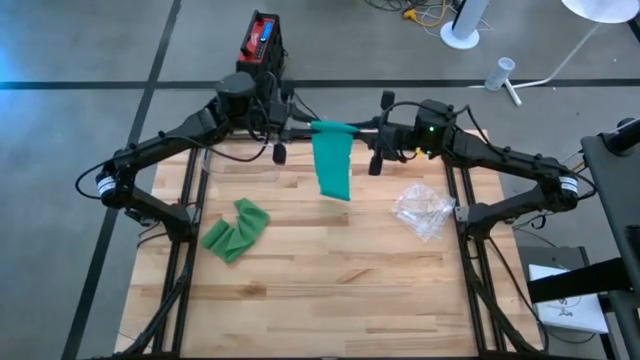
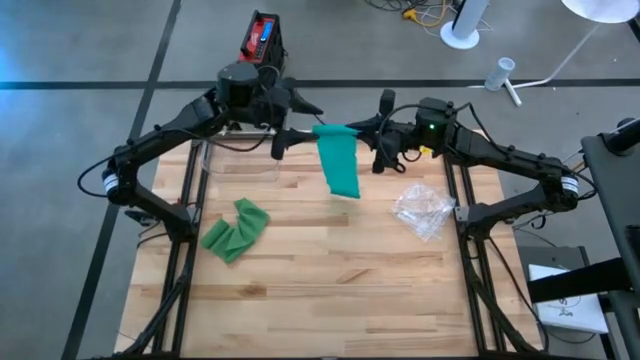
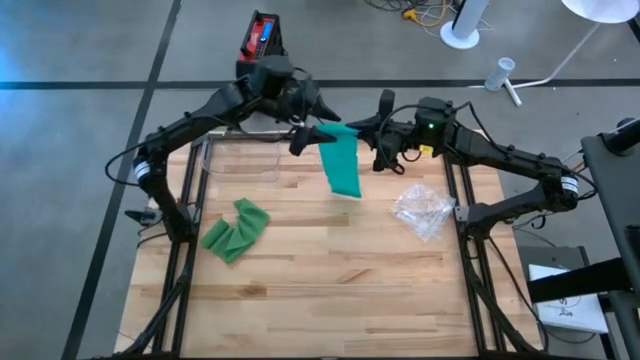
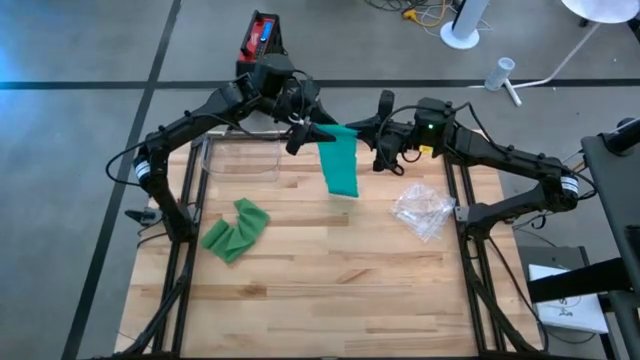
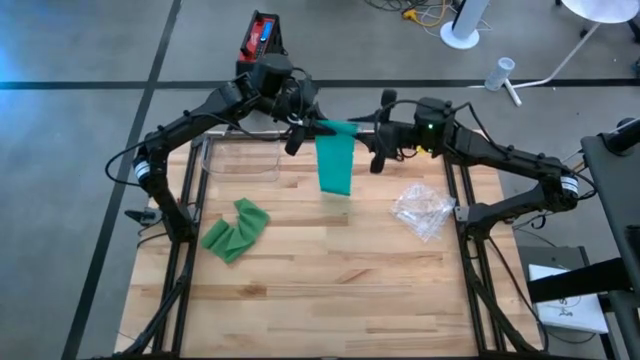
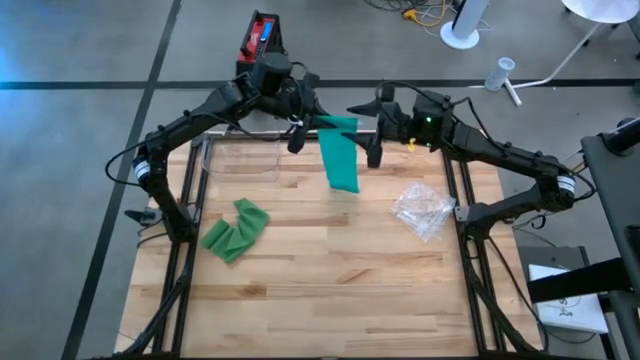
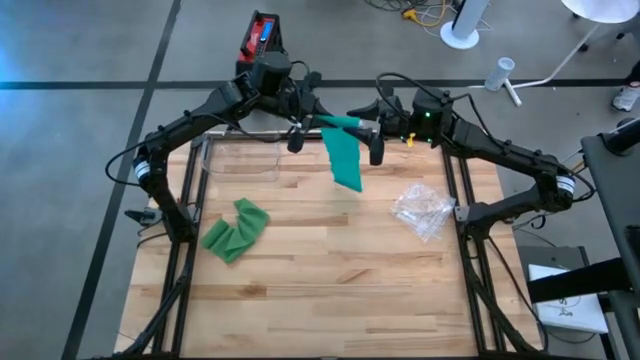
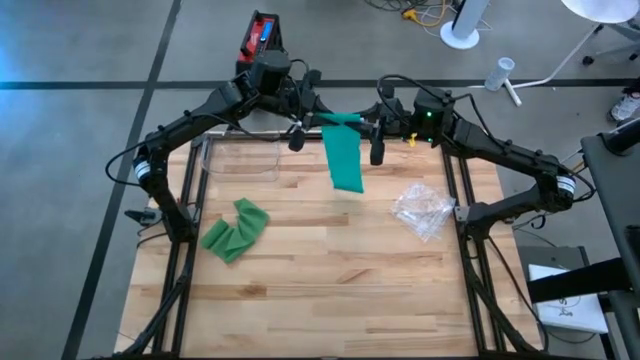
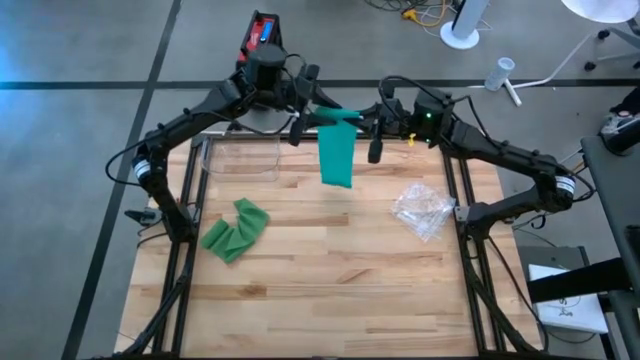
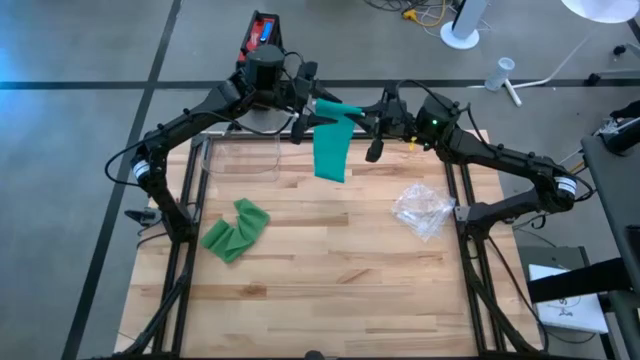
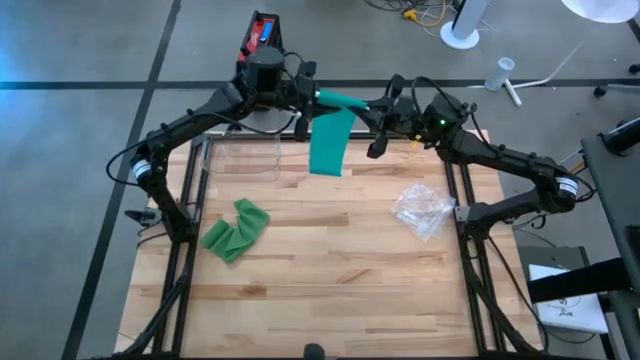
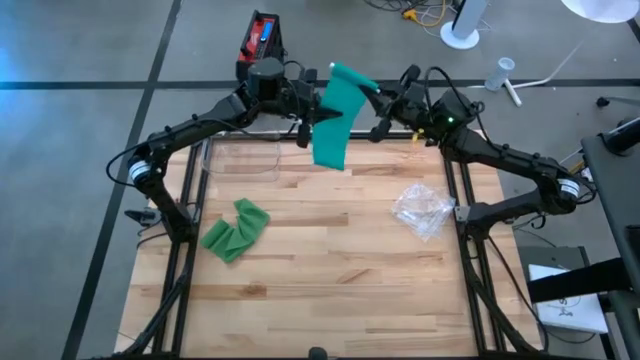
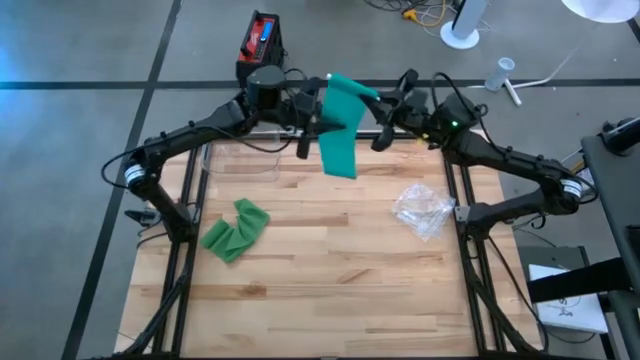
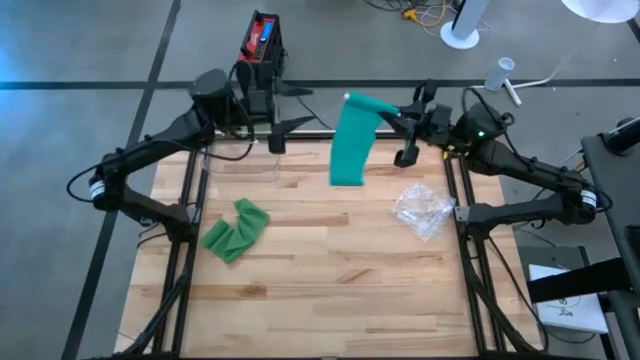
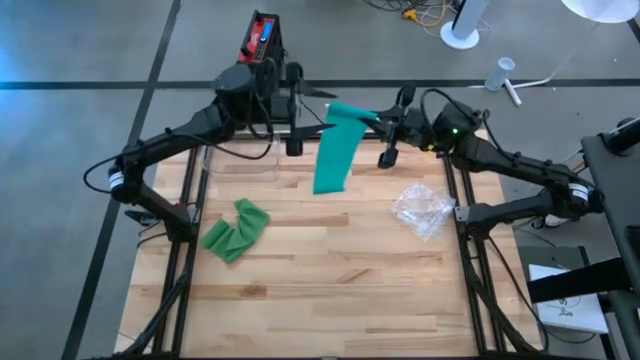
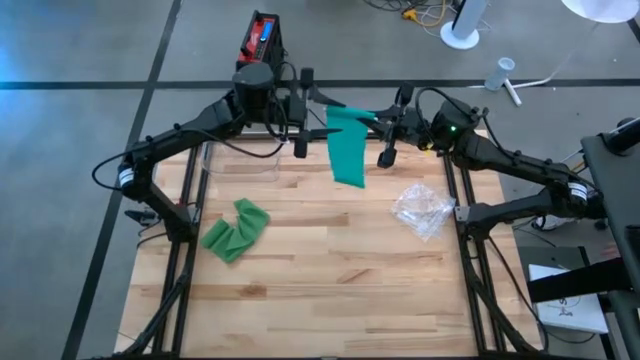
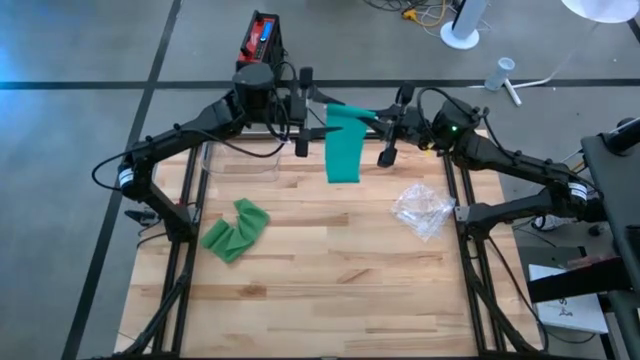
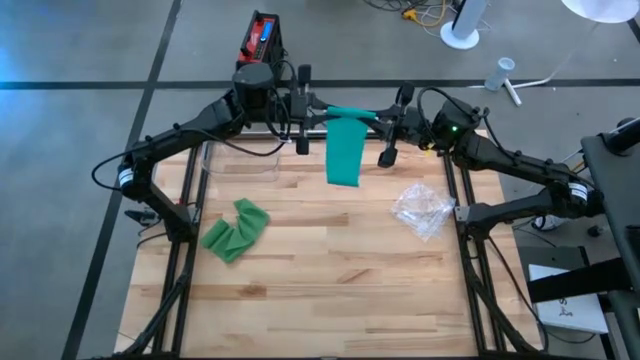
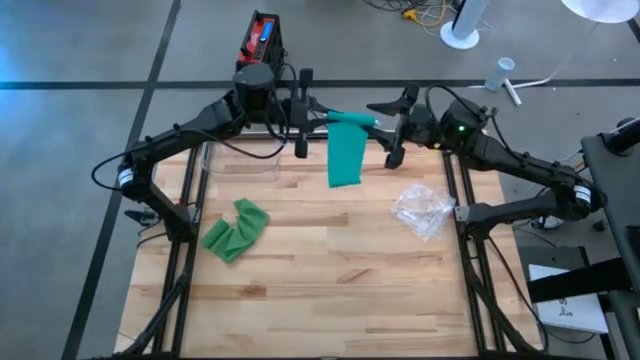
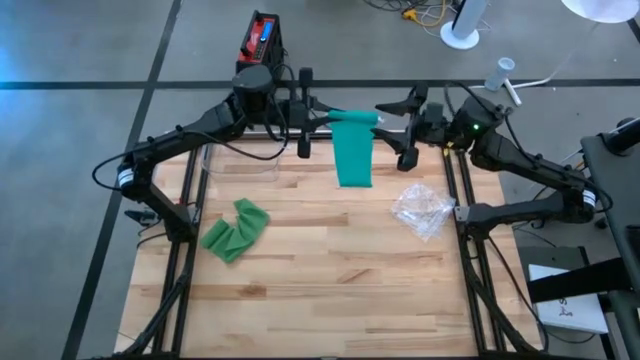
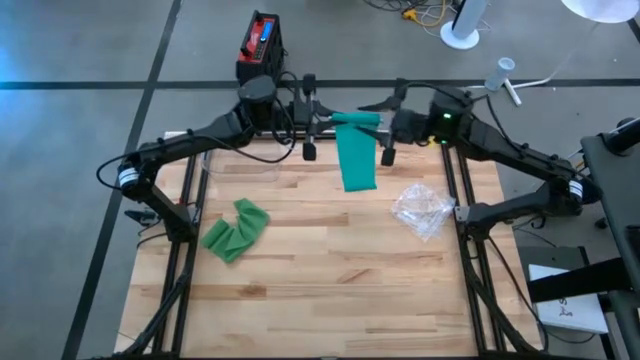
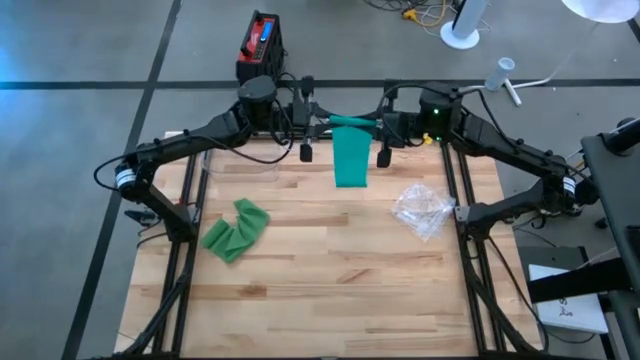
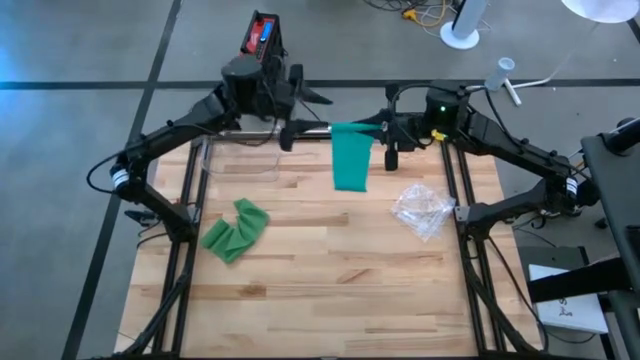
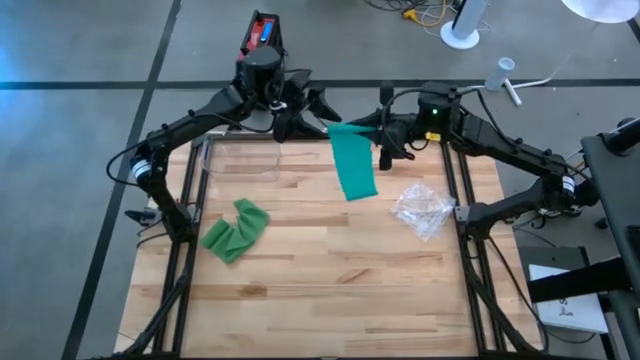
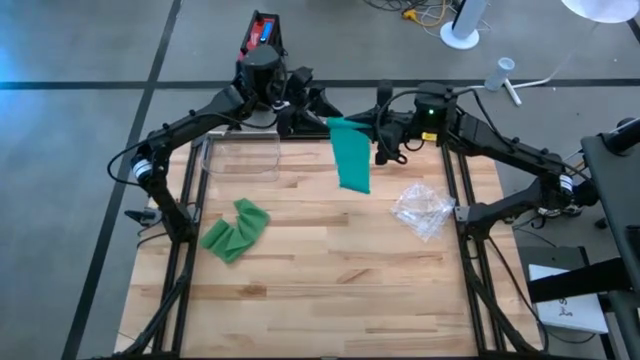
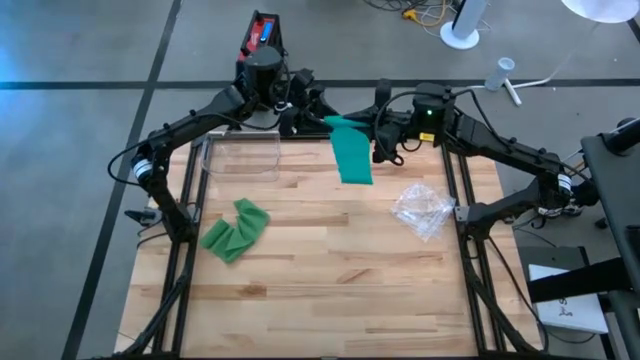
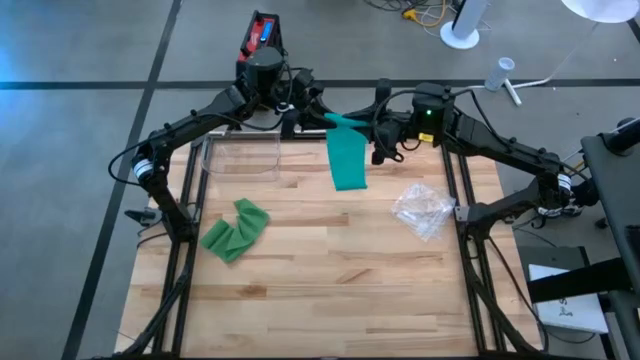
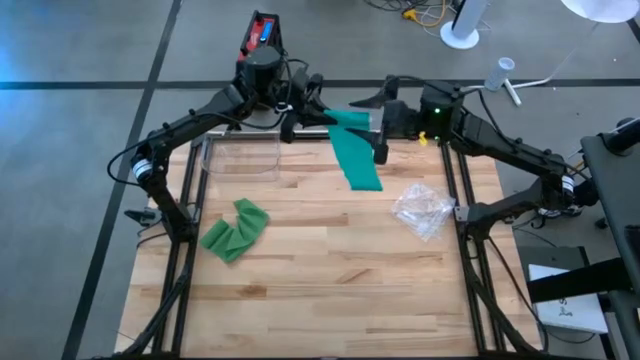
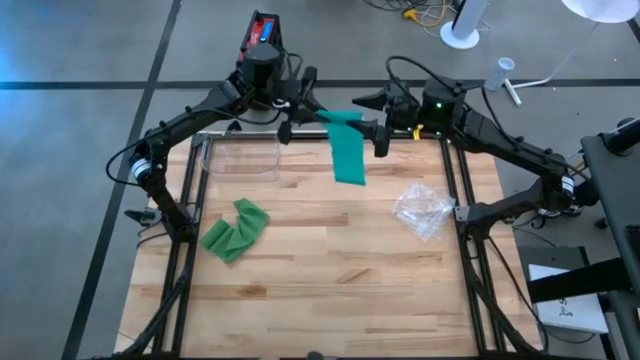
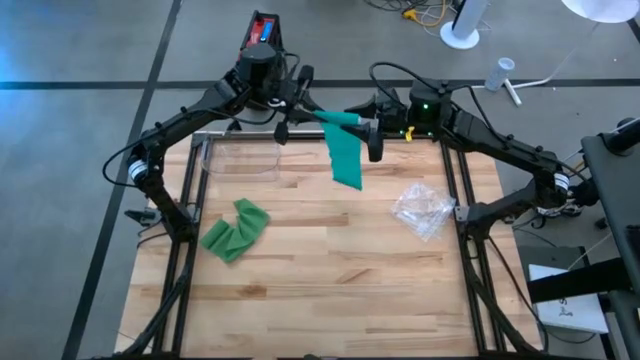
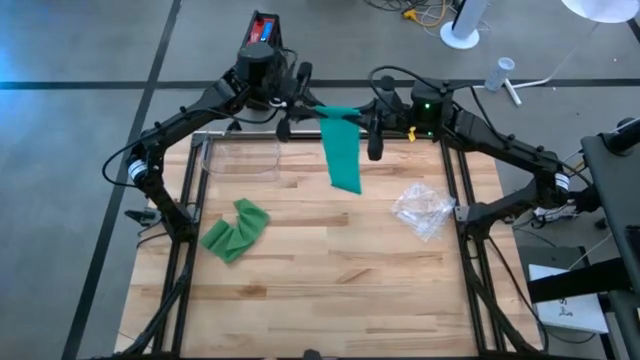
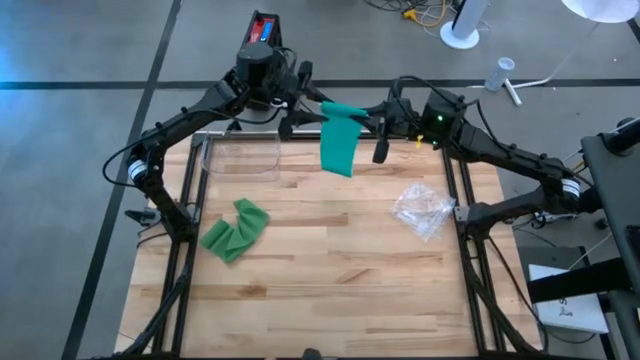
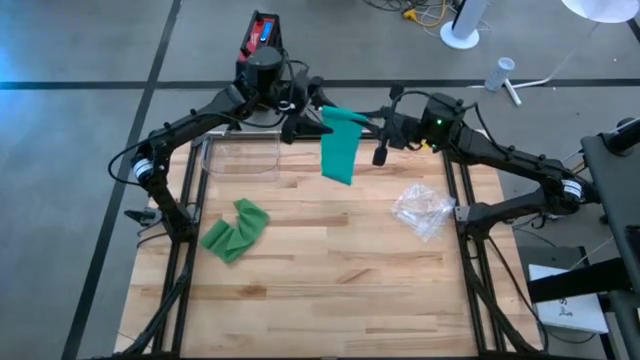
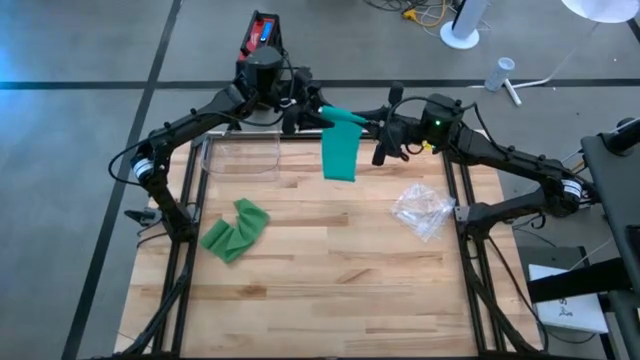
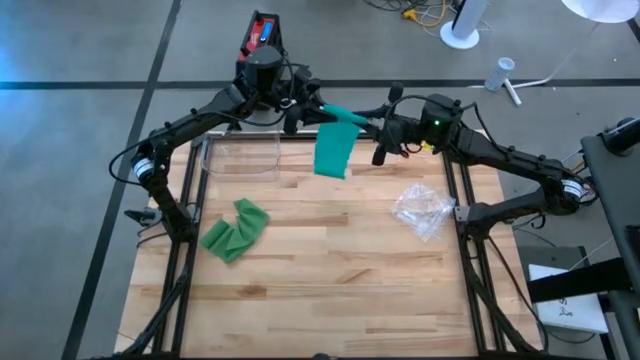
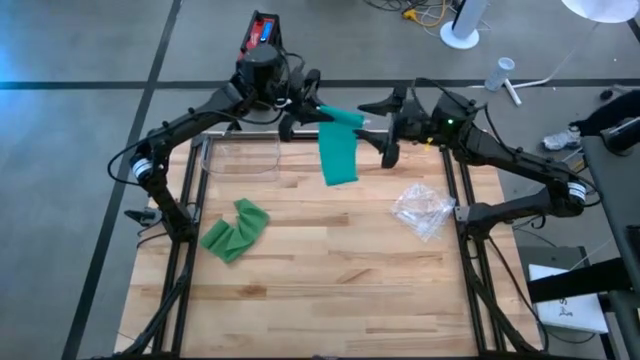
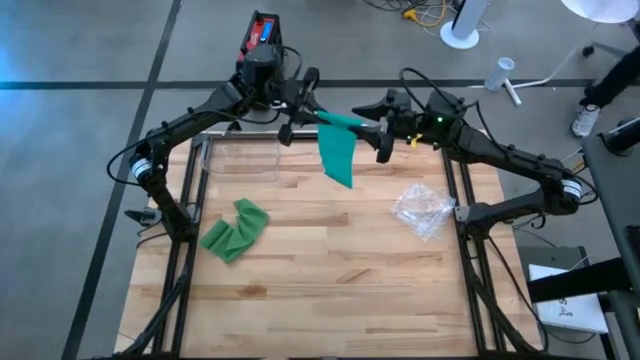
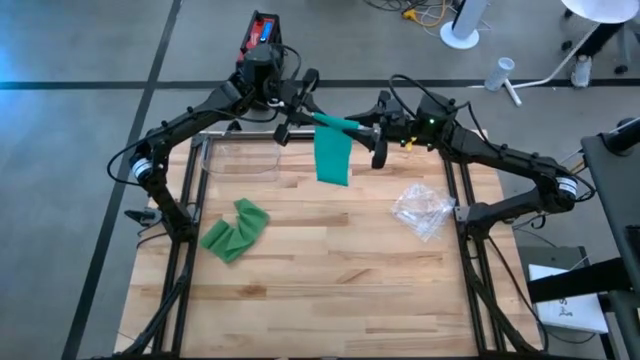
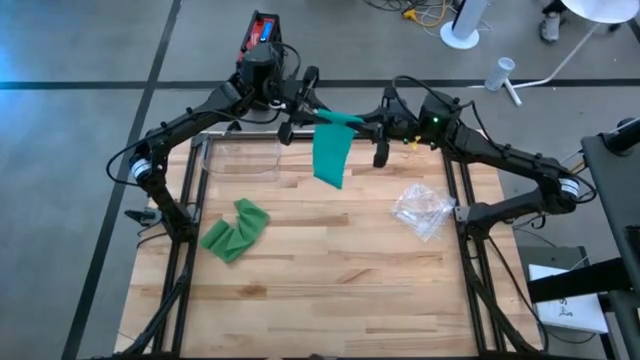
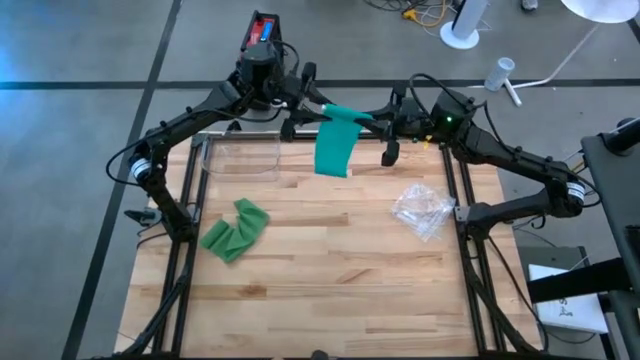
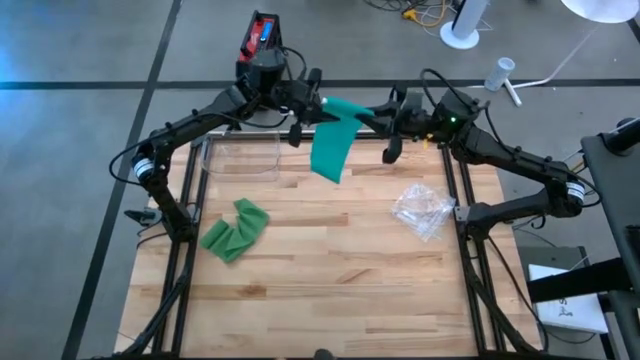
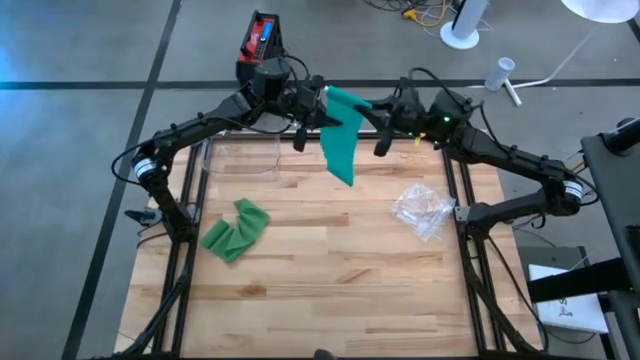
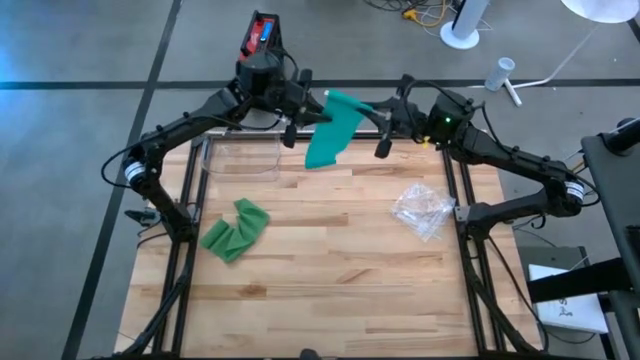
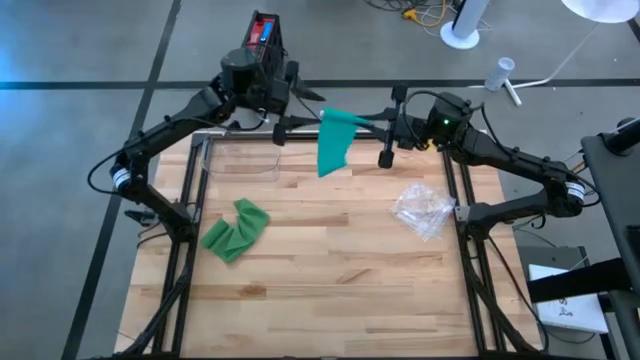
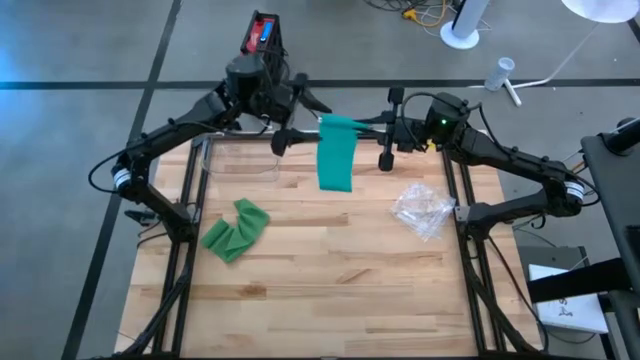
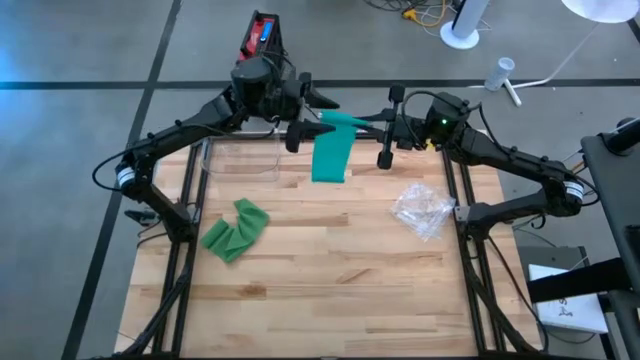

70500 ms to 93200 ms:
Task: Roll bandage
Roll the blue bandage
